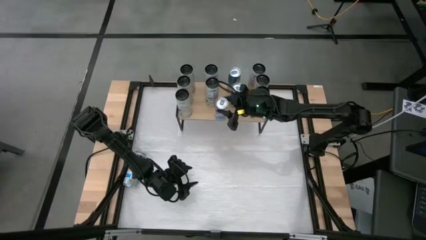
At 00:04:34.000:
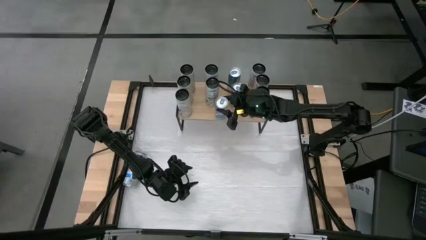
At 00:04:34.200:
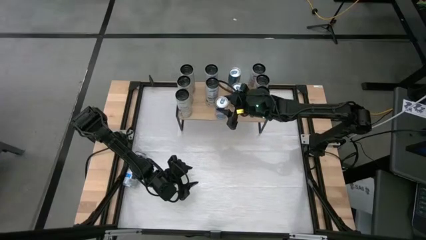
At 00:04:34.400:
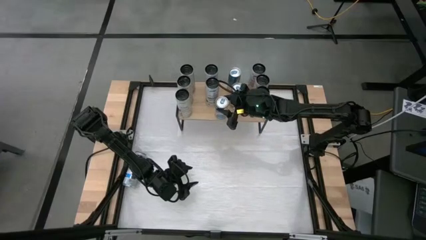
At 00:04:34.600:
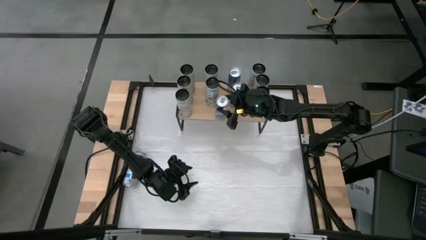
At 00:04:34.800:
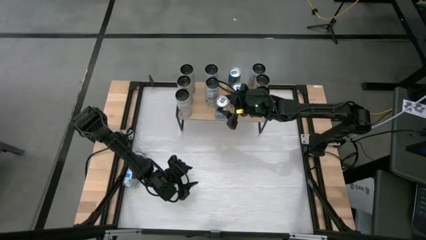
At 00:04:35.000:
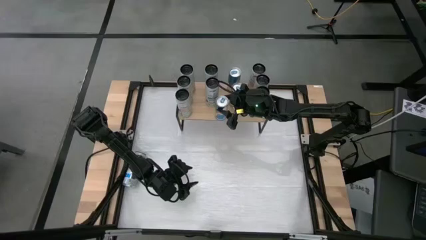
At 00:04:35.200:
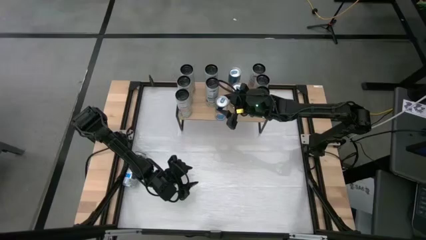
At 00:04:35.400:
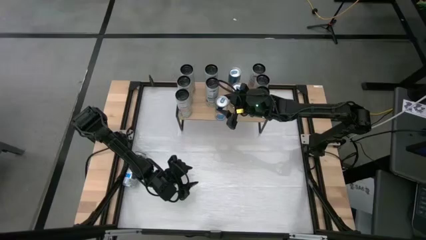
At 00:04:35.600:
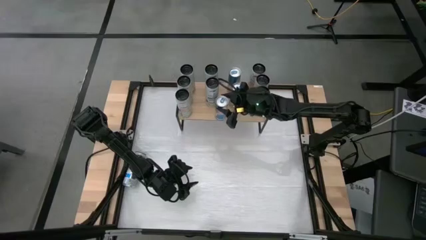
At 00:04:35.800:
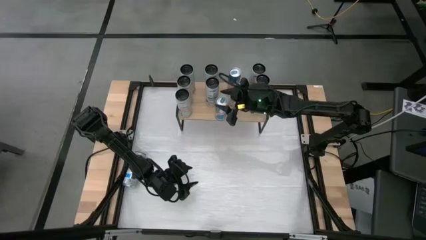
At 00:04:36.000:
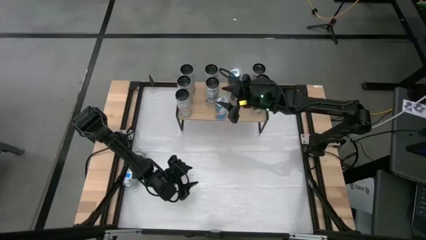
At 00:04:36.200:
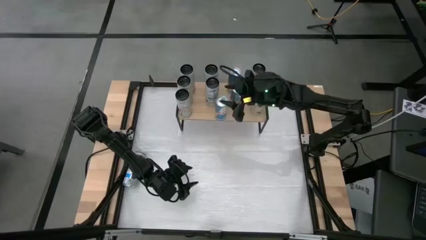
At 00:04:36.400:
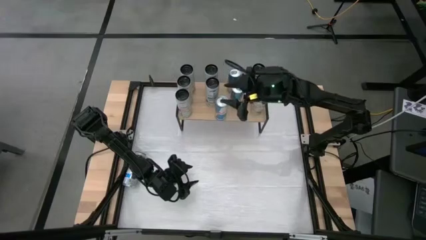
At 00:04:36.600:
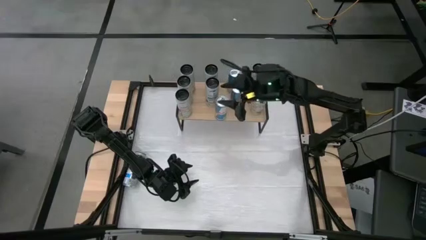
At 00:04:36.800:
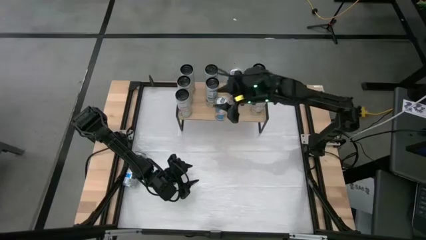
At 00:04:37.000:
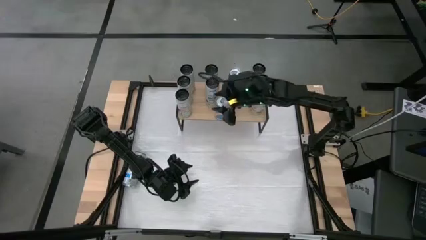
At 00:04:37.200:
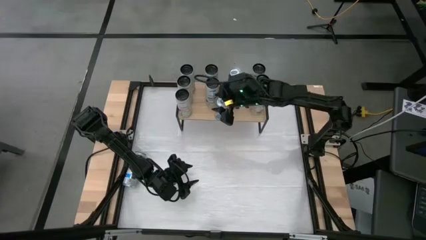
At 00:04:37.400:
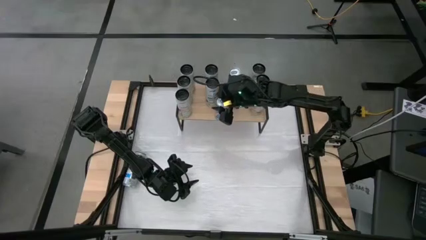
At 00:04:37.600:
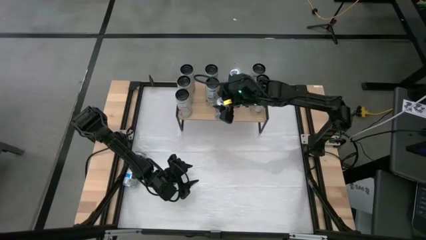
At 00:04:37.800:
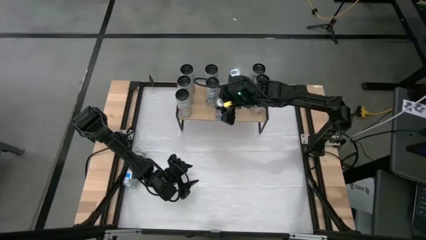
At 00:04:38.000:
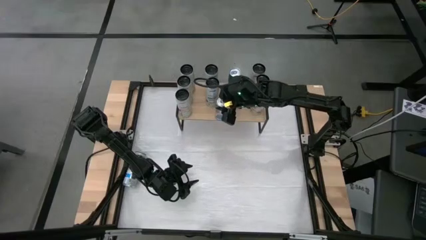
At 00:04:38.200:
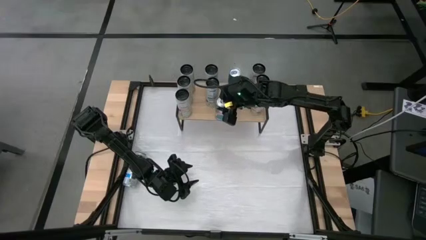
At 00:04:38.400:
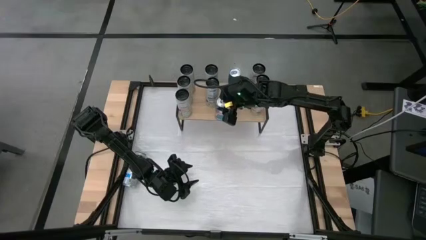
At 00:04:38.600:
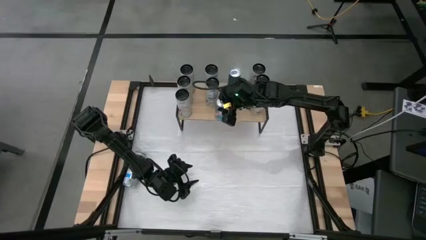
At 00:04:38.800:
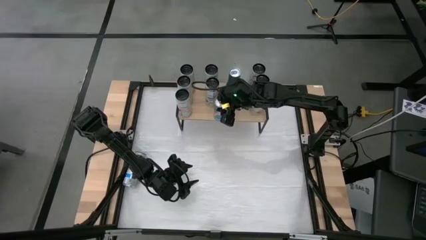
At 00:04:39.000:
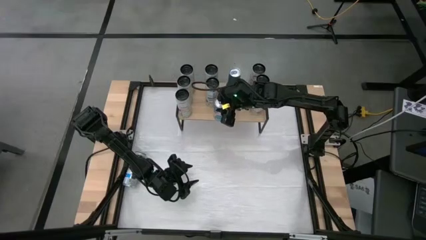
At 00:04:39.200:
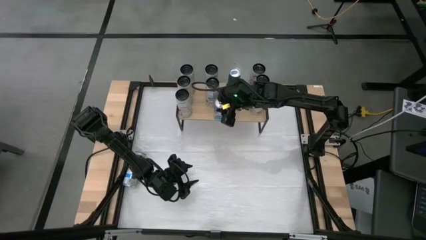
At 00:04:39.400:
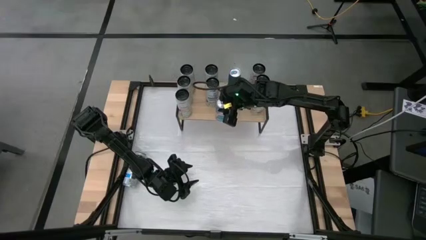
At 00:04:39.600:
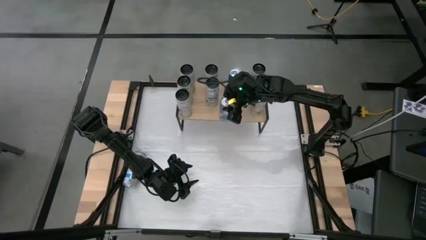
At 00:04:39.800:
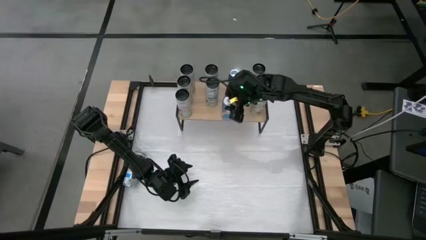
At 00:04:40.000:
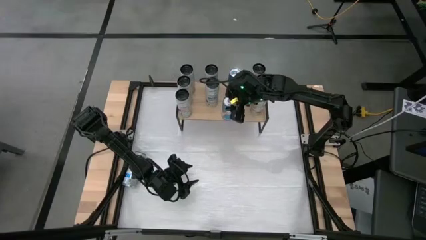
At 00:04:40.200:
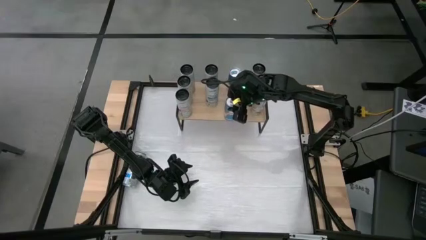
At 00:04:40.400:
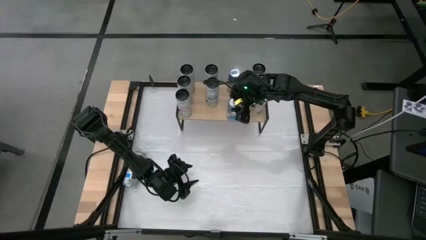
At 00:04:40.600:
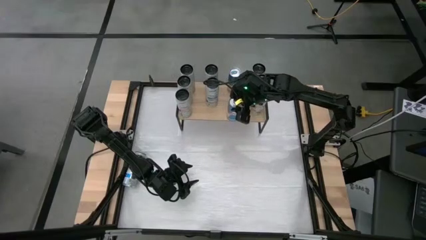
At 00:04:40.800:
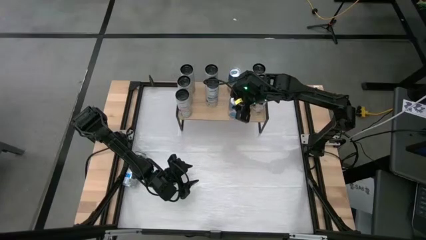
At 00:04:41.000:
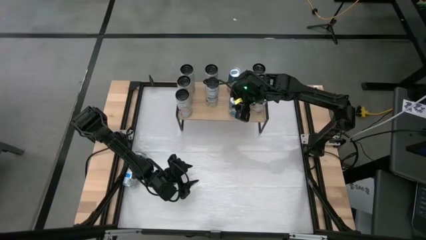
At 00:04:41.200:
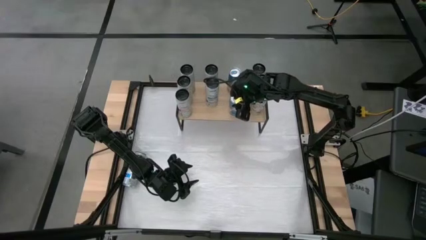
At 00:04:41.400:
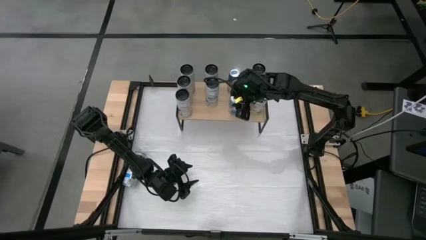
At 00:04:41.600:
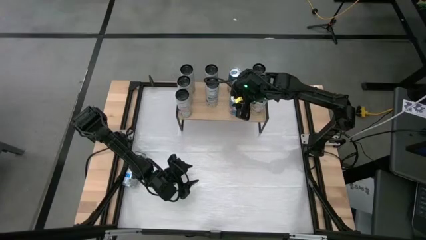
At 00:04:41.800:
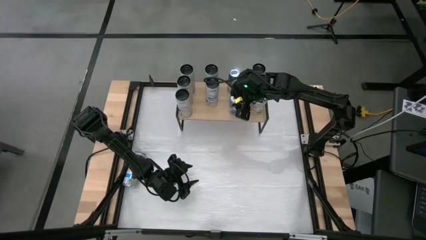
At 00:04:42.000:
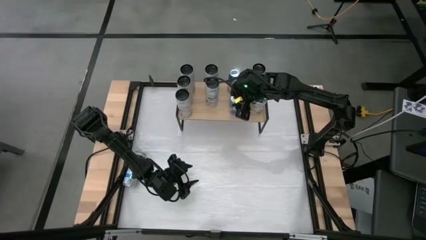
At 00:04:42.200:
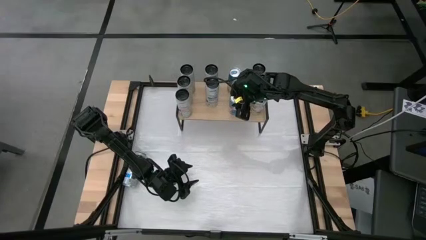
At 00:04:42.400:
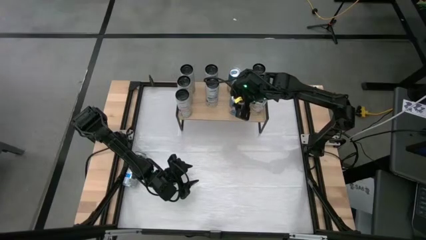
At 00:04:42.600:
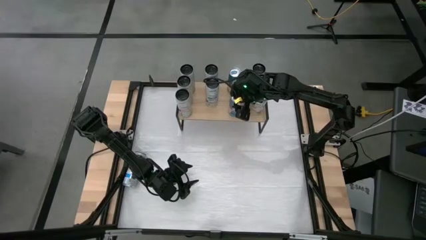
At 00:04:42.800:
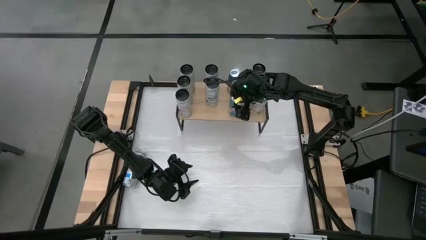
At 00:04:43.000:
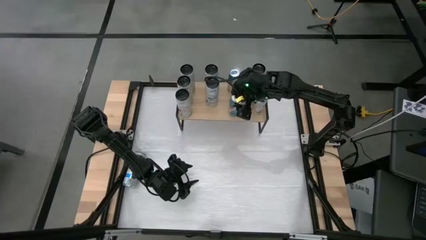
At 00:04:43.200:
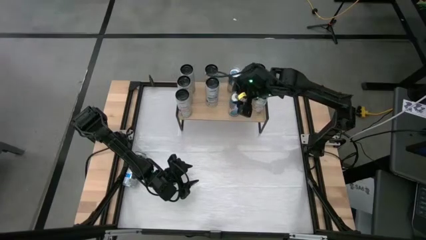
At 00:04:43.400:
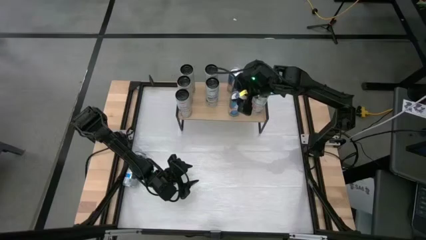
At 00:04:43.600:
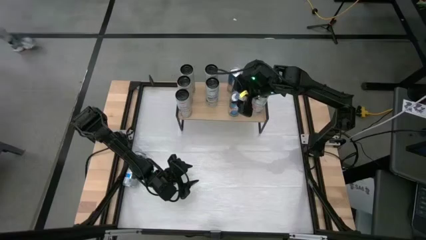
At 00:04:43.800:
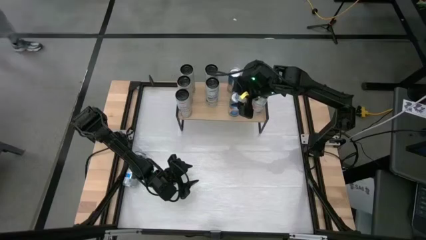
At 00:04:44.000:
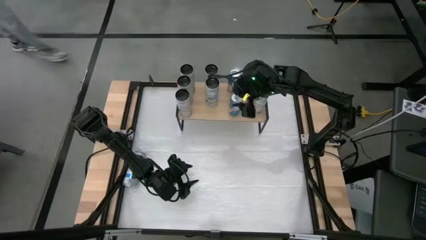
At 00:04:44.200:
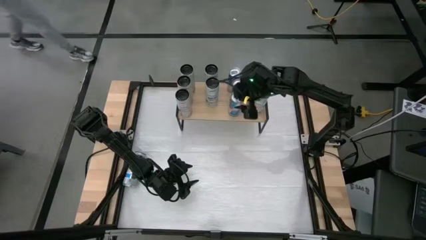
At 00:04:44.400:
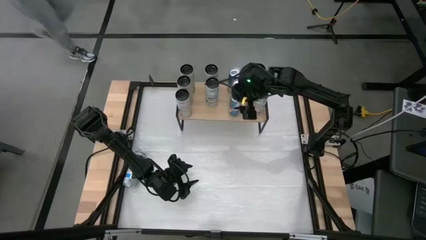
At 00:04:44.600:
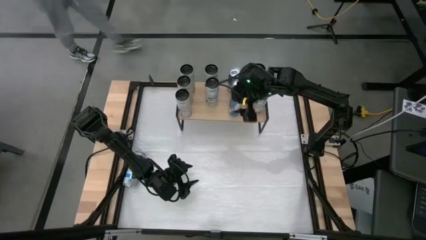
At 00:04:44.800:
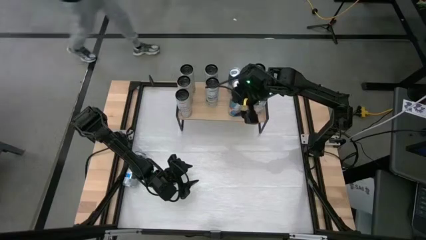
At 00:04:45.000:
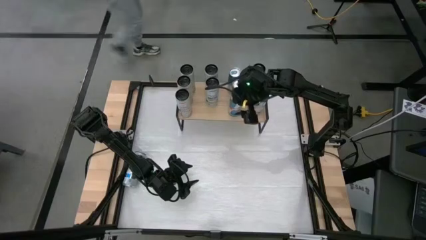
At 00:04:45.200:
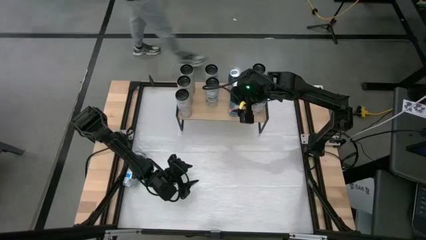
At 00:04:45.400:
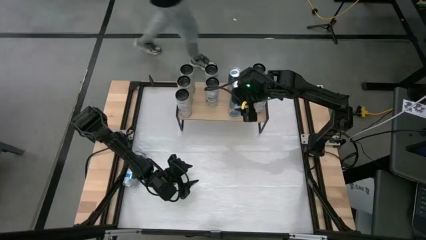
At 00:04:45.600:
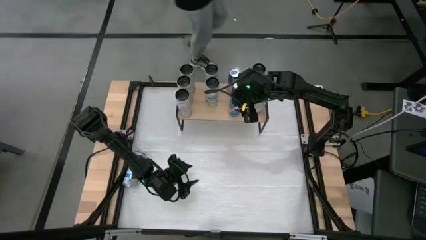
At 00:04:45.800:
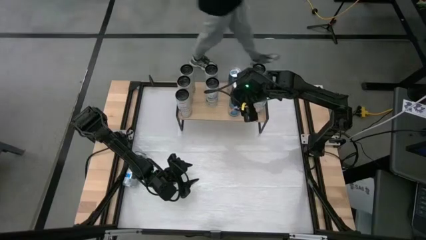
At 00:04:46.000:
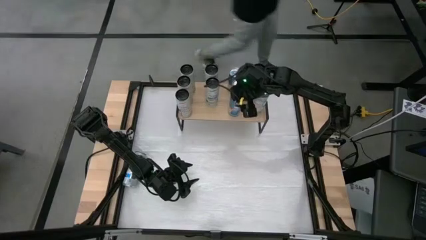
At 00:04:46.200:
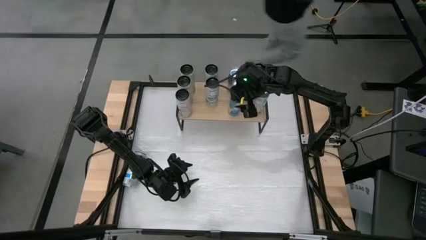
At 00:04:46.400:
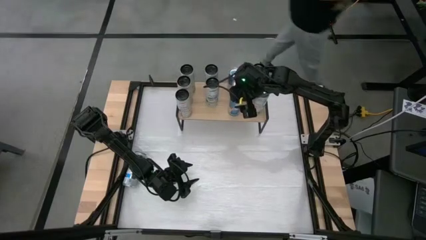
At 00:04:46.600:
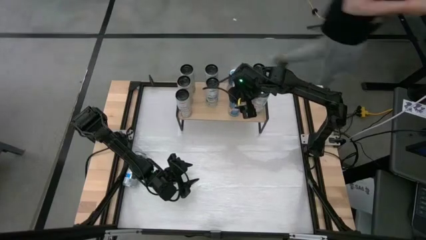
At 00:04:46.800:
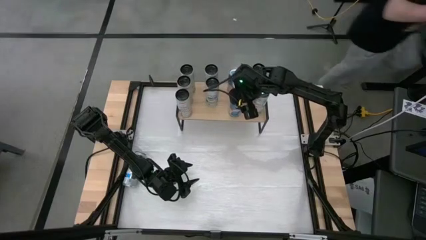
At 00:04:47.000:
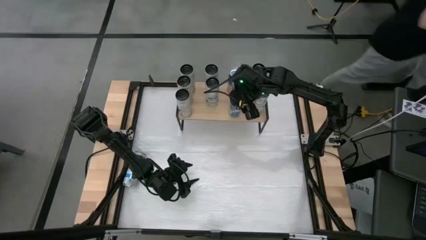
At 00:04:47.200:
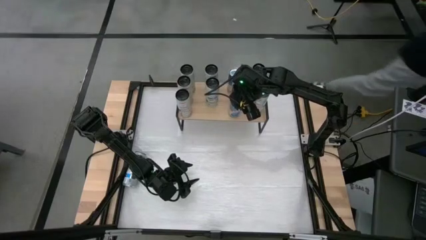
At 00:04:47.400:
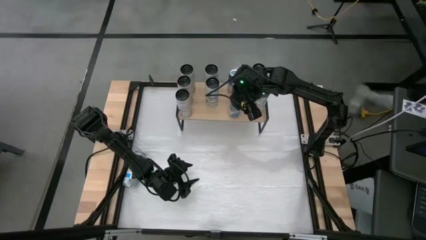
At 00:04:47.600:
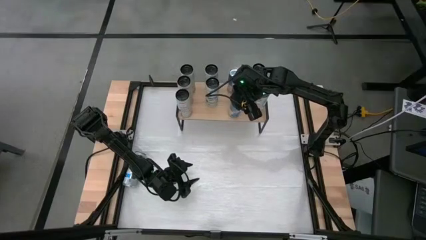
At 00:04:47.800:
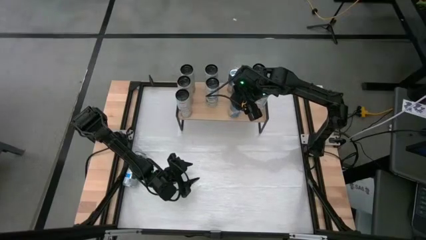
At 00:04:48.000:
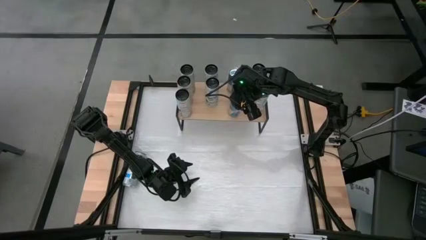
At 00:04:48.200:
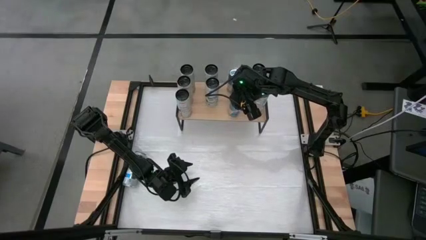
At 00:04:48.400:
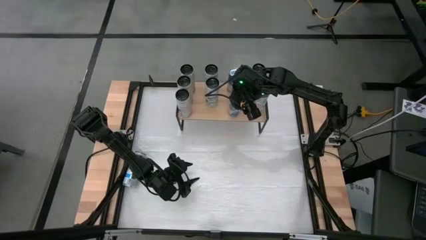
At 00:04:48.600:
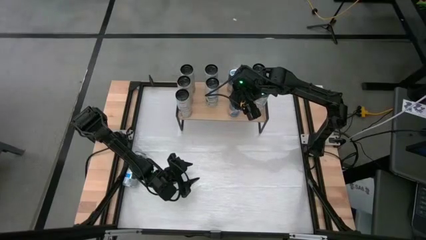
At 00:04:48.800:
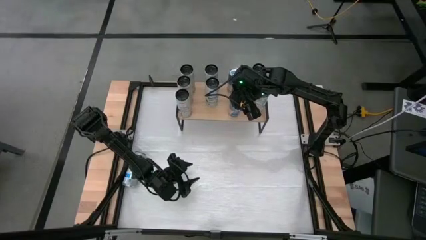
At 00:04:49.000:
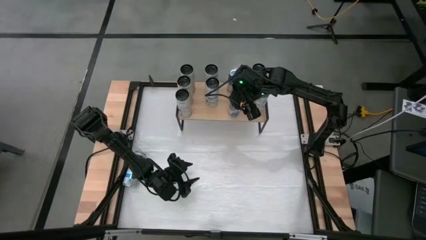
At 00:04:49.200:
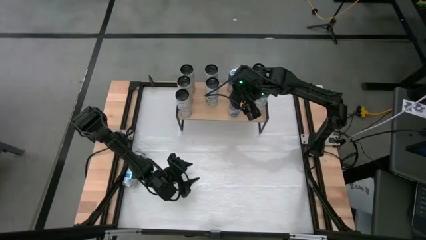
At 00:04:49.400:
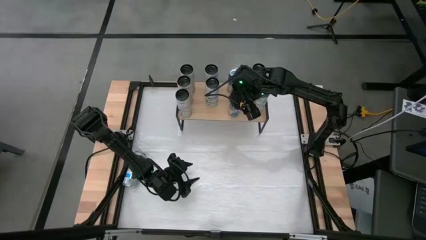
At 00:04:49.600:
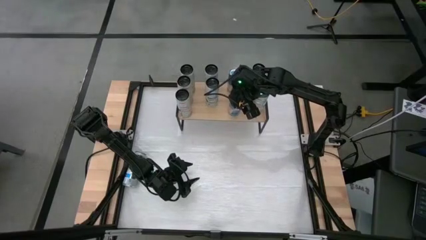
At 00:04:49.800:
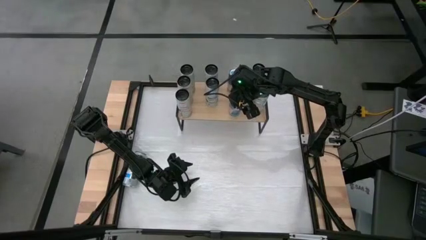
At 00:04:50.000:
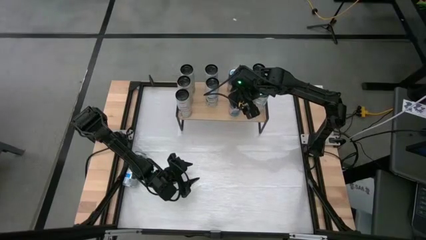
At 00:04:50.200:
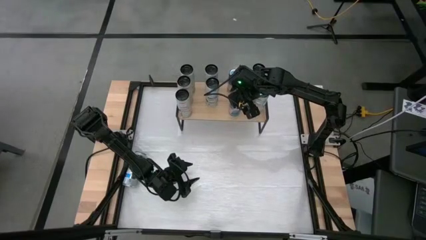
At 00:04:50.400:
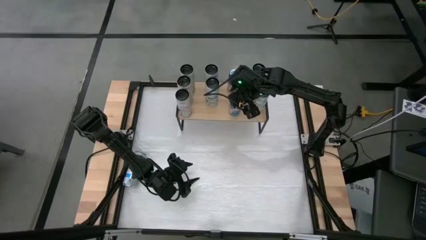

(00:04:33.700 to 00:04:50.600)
Task: Sort soda cans
Put the blue soda can on the shelf and align with other blue soda cans
